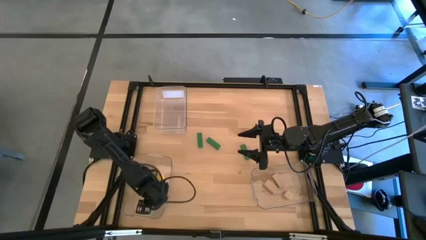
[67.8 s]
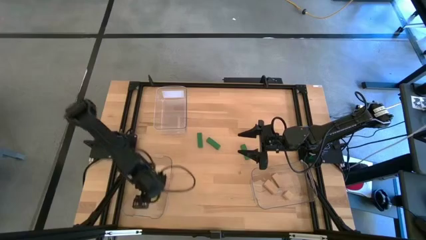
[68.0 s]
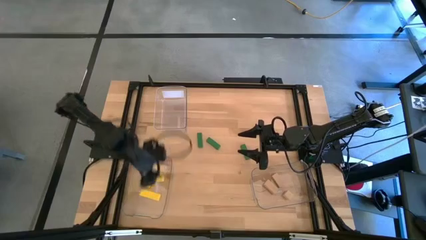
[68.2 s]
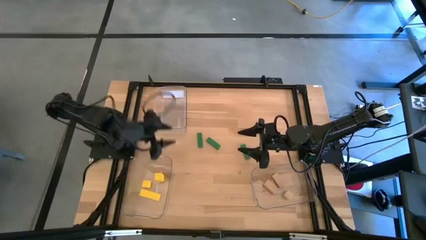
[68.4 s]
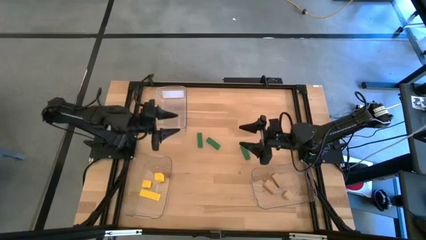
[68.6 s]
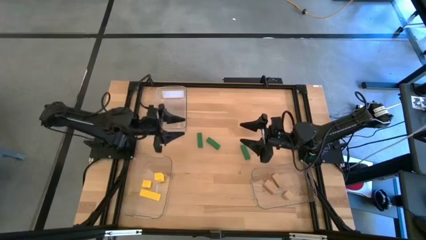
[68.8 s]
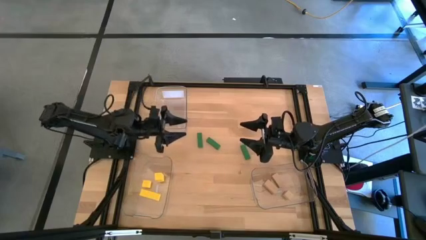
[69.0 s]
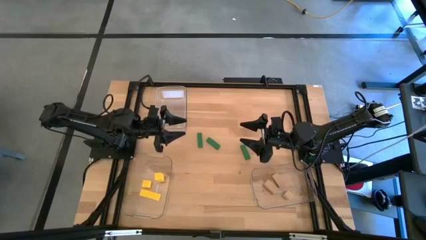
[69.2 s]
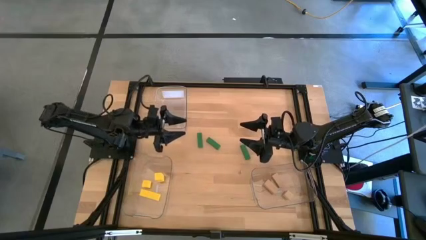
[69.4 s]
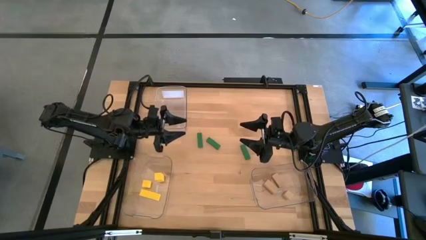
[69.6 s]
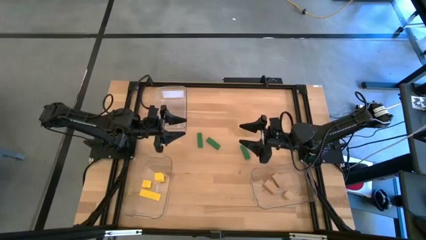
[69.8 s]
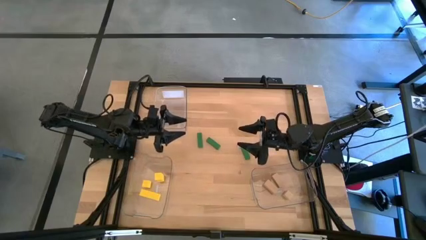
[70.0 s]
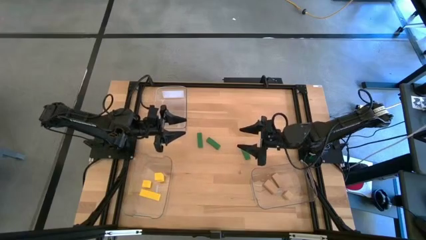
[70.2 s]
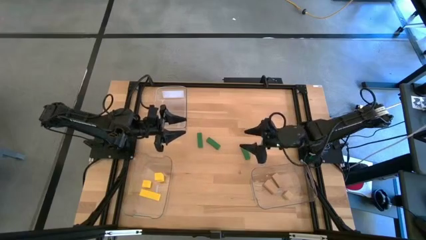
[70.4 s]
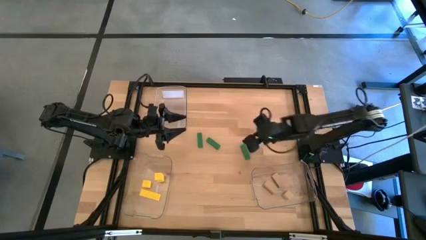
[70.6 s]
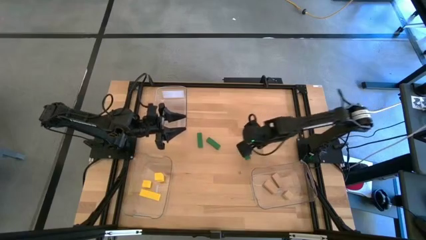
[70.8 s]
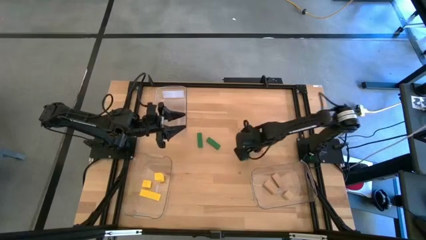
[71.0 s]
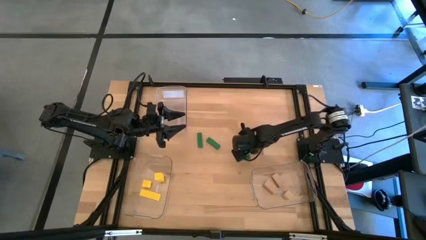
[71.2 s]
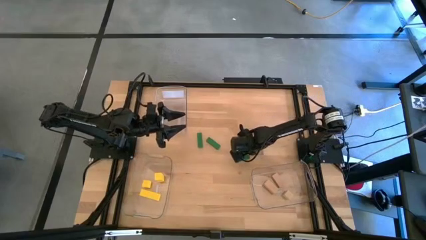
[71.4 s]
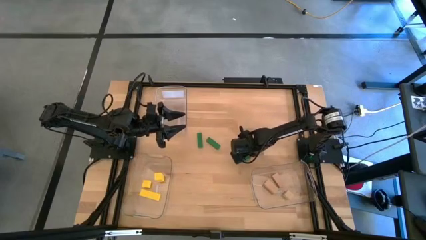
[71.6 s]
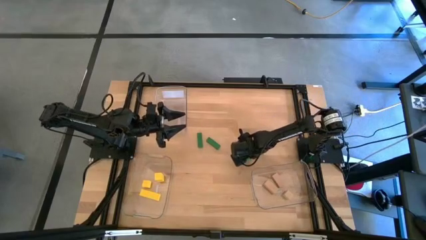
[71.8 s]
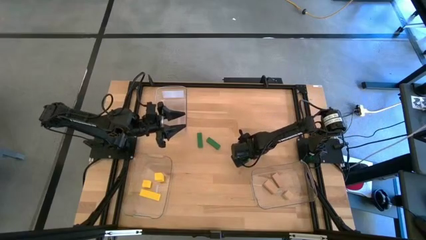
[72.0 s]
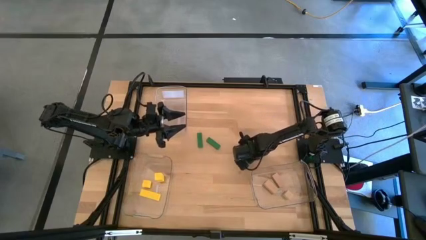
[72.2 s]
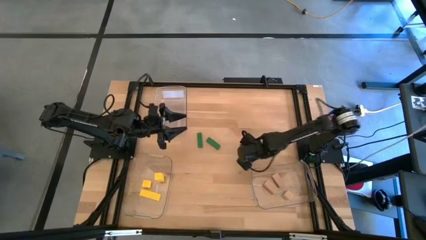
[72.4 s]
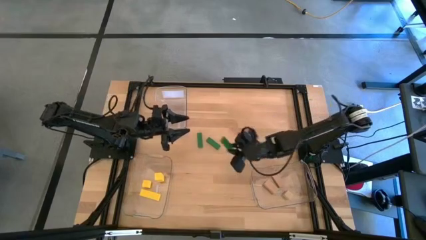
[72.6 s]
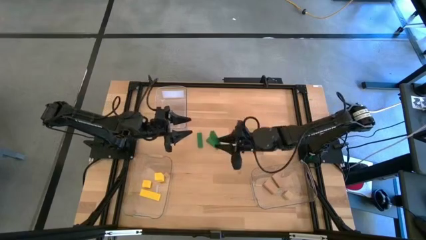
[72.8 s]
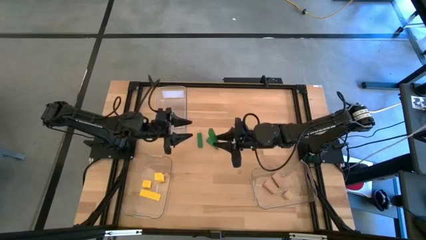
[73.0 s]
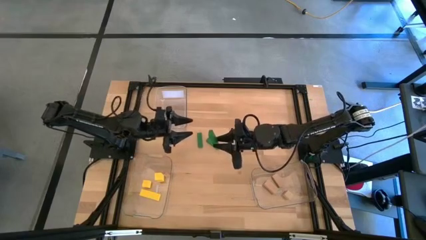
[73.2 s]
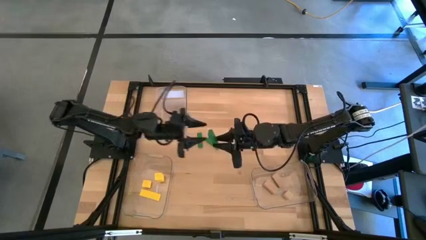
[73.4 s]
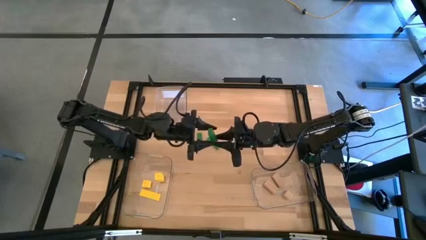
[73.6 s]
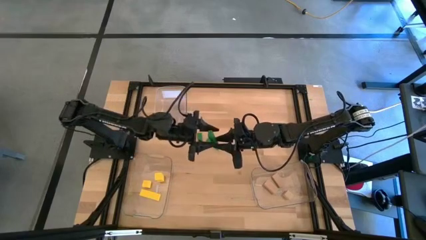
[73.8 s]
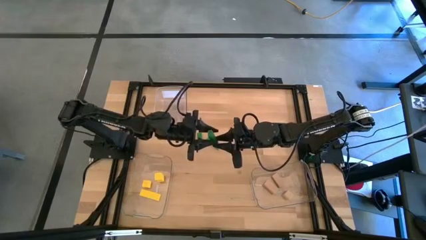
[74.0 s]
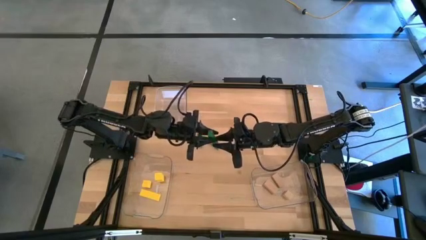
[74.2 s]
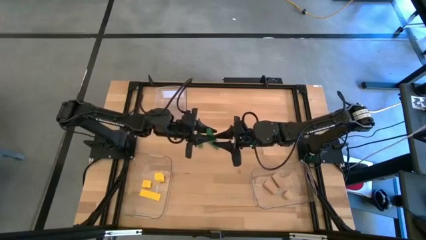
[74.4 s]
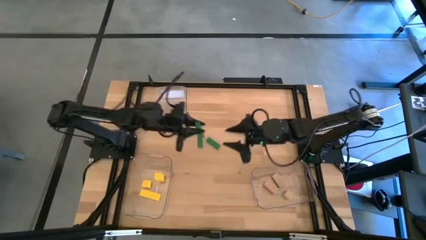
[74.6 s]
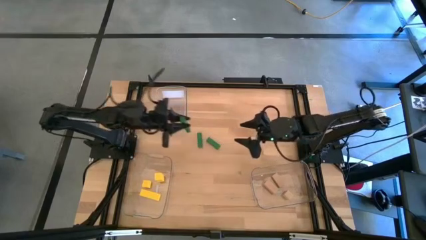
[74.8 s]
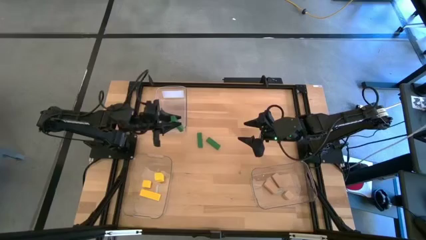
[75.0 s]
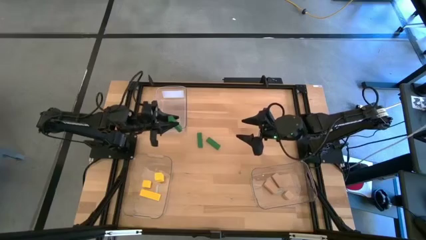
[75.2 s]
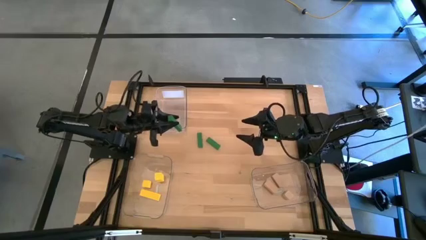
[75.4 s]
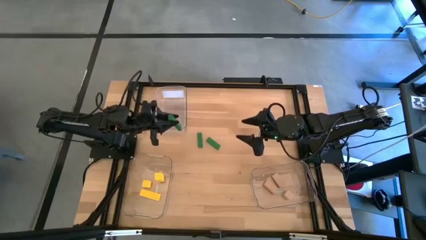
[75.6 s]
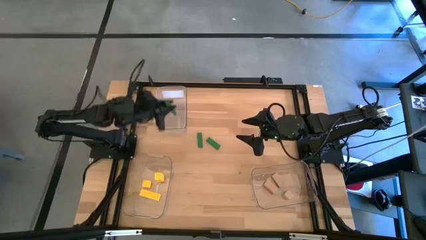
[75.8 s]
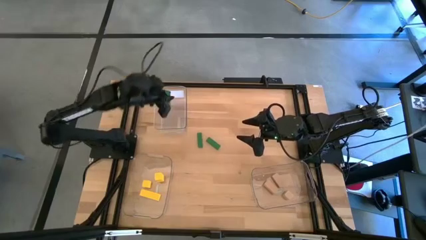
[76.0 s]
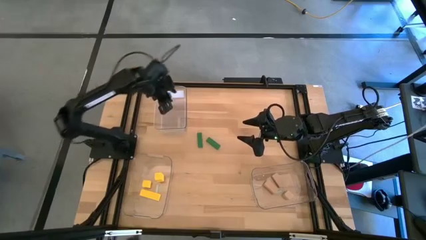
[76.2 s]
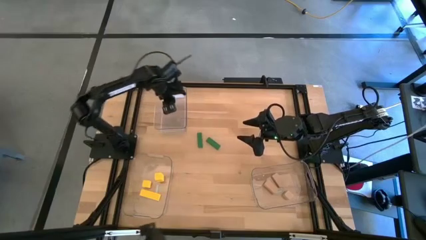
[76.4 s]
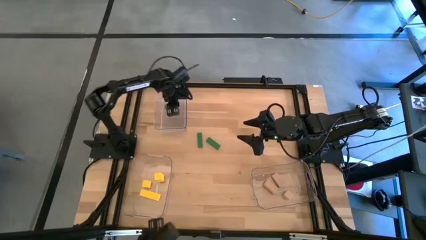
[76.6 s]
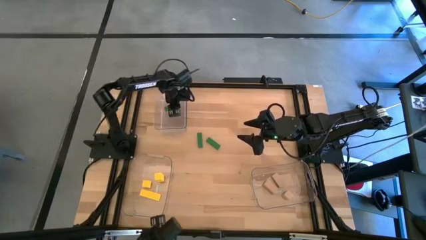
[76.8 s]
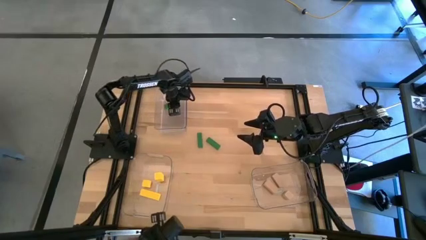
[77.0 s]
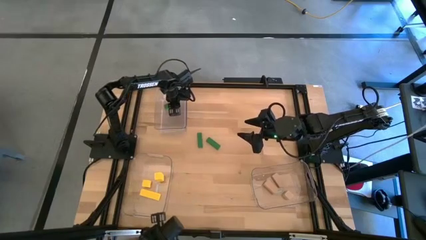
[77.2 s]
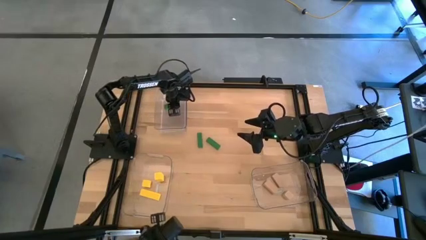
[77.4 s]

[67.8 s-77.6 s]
Task: Sort & place blocks by color
Put the right green block into the top left transparent bin
